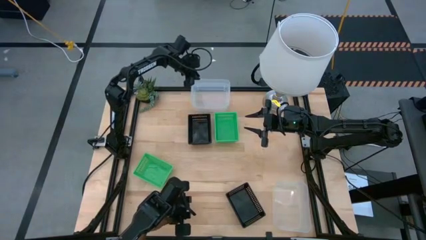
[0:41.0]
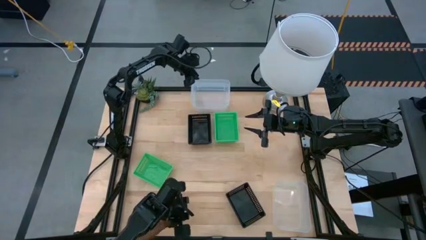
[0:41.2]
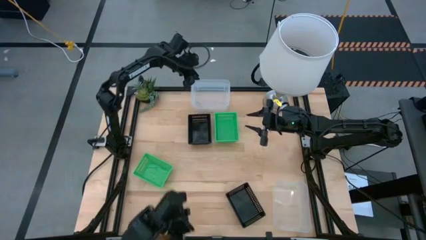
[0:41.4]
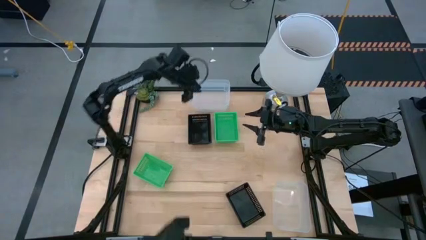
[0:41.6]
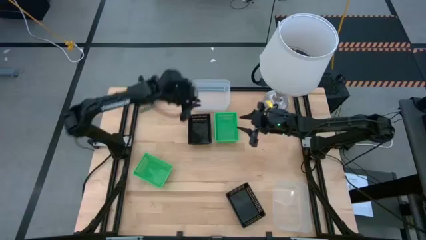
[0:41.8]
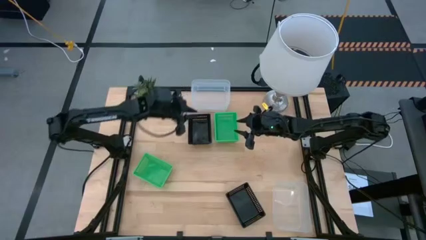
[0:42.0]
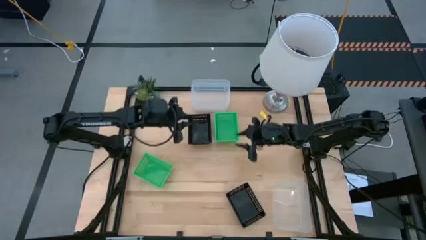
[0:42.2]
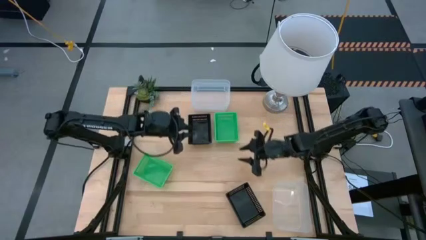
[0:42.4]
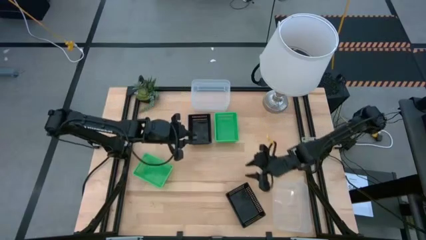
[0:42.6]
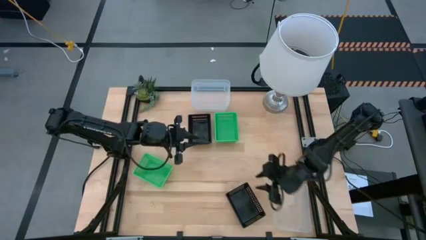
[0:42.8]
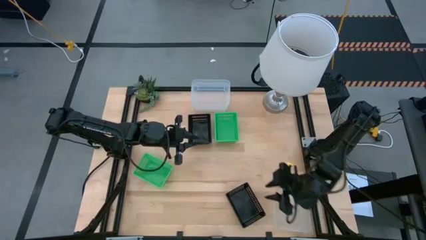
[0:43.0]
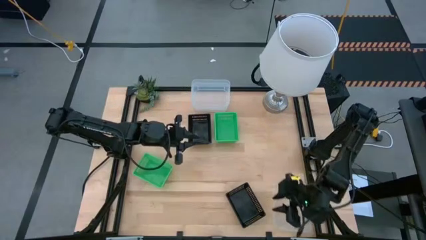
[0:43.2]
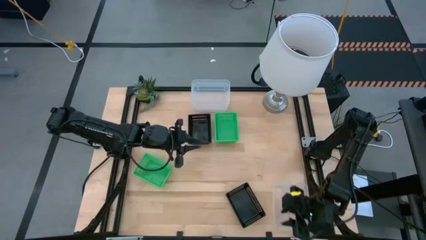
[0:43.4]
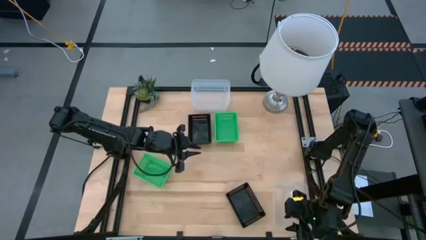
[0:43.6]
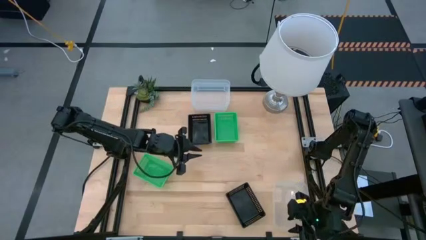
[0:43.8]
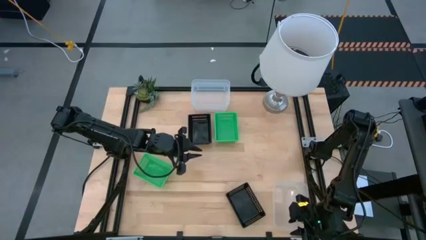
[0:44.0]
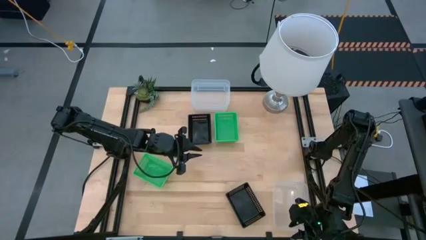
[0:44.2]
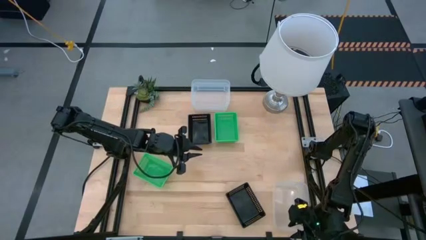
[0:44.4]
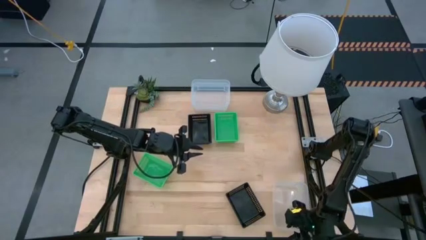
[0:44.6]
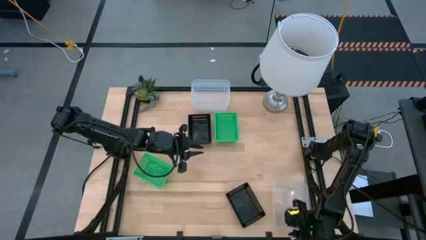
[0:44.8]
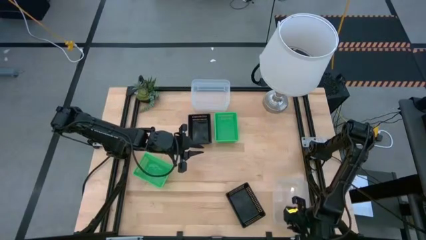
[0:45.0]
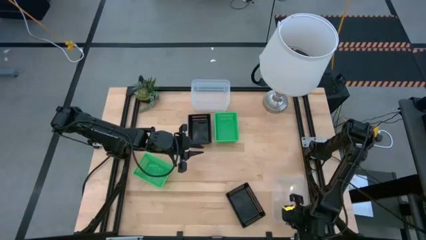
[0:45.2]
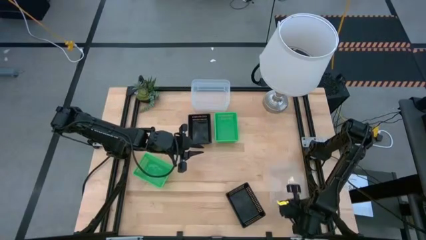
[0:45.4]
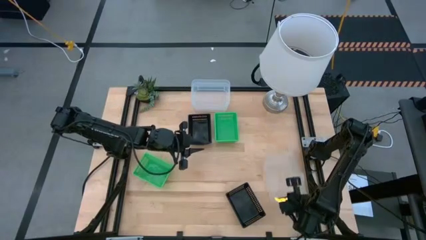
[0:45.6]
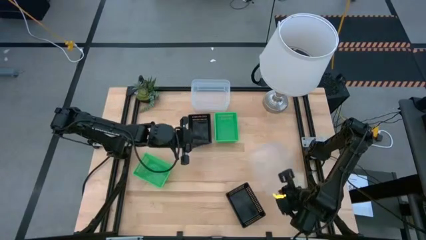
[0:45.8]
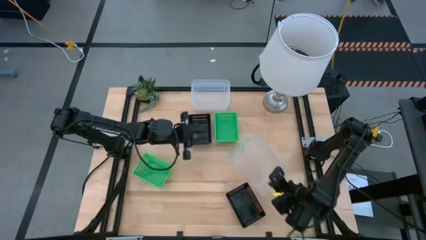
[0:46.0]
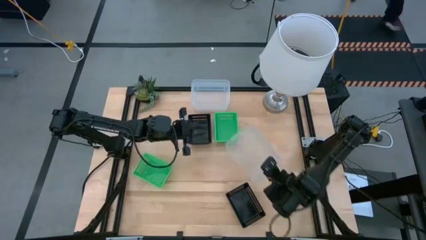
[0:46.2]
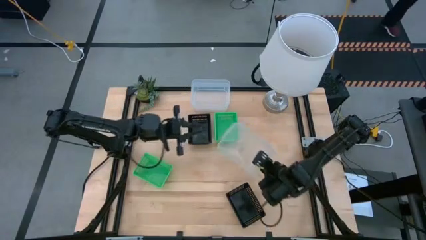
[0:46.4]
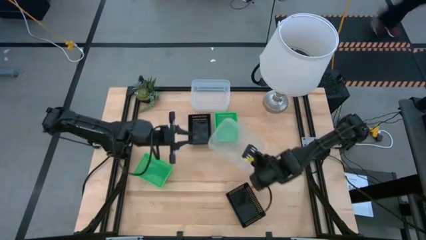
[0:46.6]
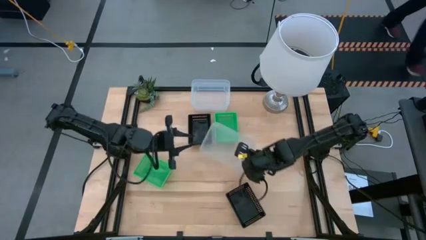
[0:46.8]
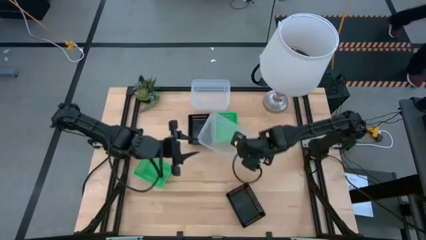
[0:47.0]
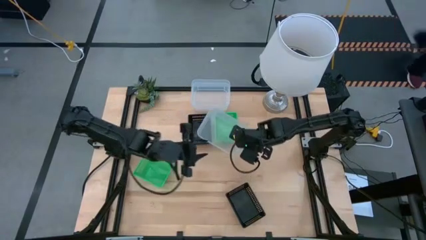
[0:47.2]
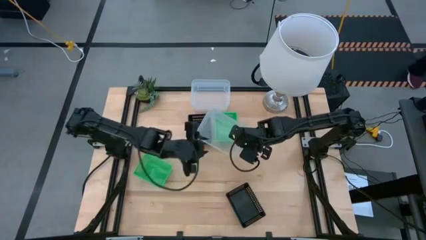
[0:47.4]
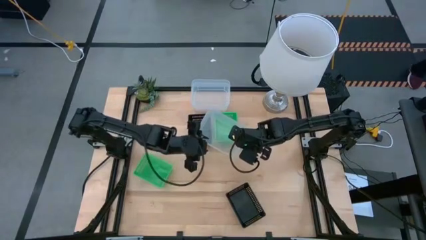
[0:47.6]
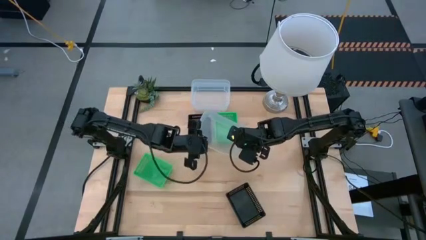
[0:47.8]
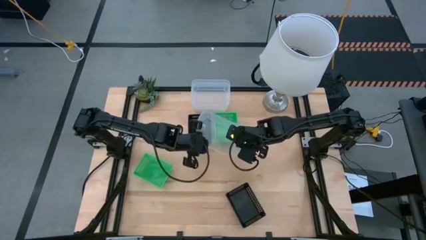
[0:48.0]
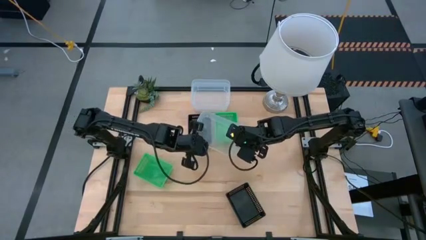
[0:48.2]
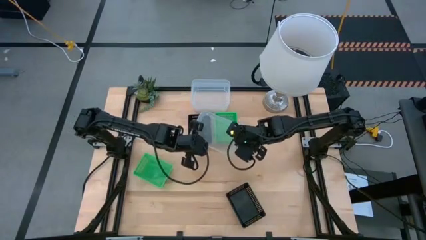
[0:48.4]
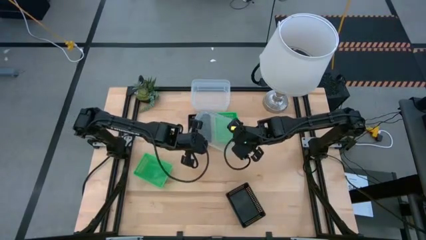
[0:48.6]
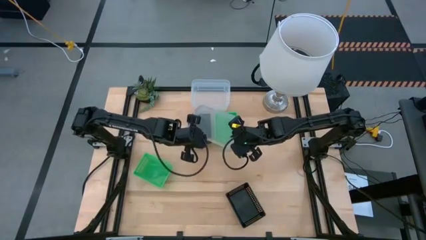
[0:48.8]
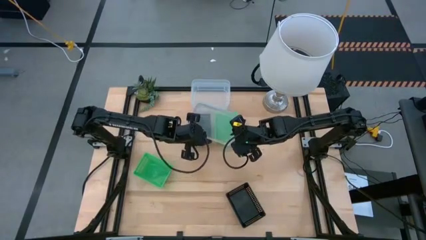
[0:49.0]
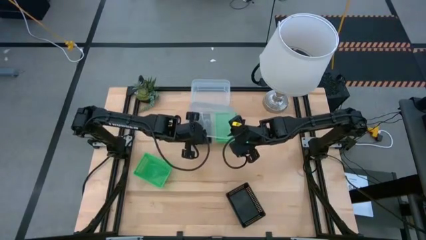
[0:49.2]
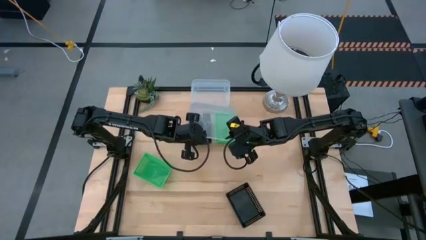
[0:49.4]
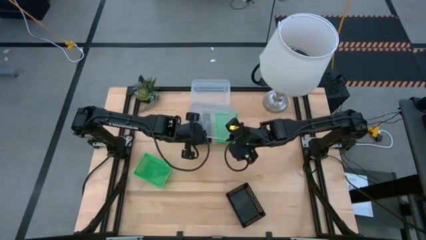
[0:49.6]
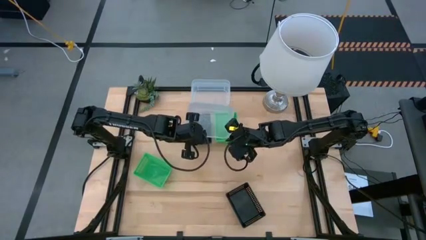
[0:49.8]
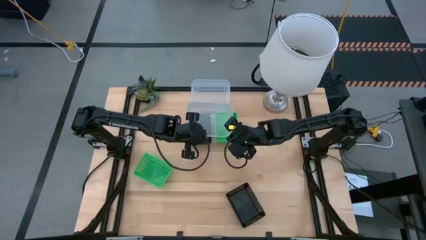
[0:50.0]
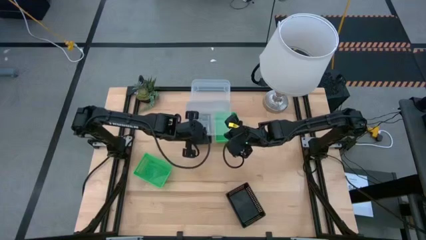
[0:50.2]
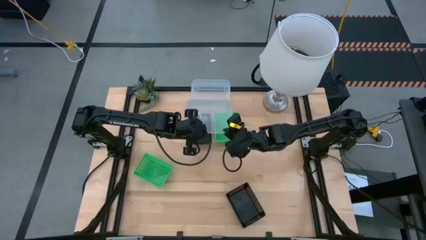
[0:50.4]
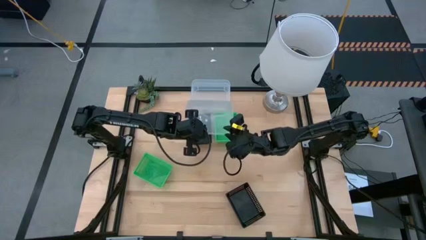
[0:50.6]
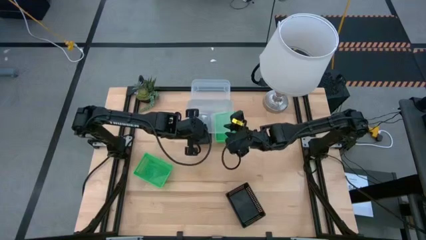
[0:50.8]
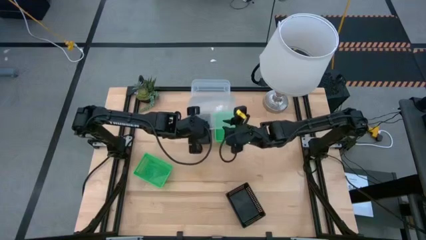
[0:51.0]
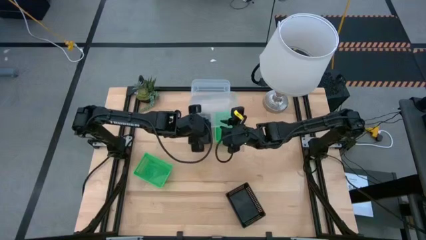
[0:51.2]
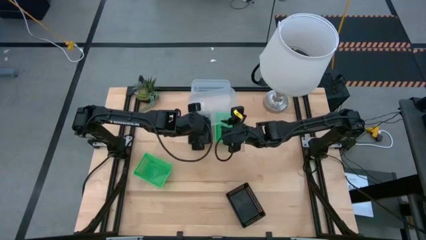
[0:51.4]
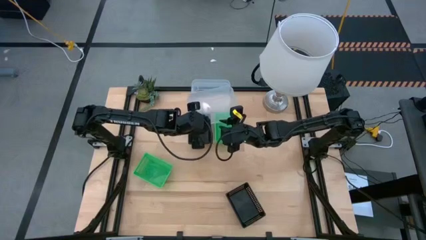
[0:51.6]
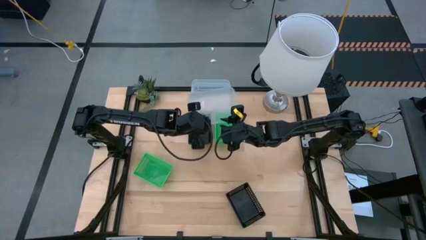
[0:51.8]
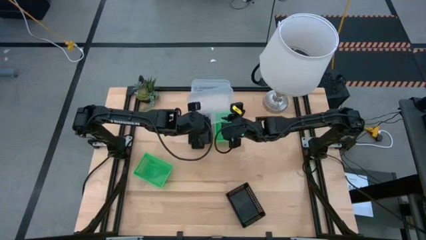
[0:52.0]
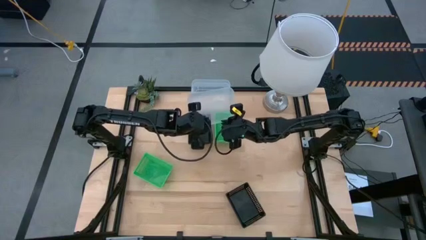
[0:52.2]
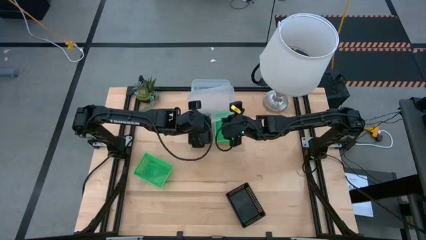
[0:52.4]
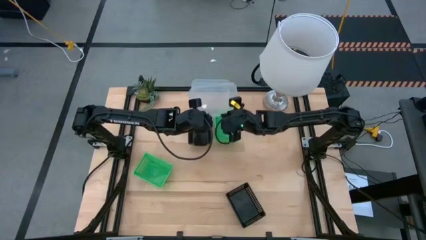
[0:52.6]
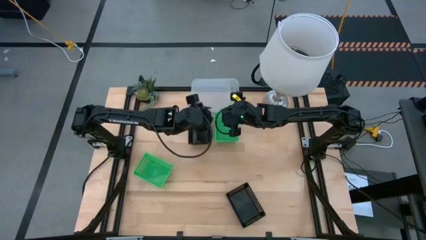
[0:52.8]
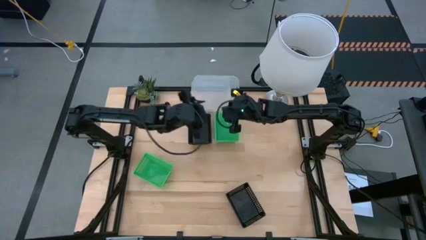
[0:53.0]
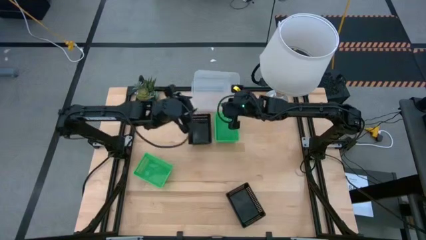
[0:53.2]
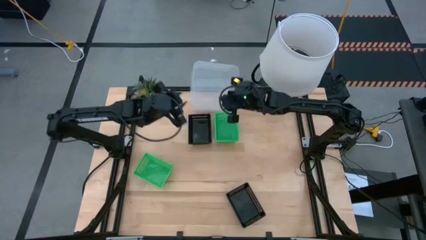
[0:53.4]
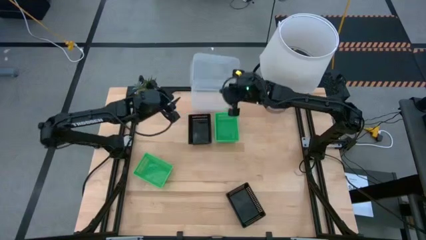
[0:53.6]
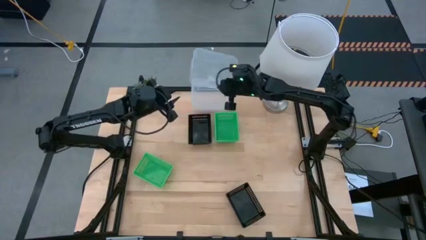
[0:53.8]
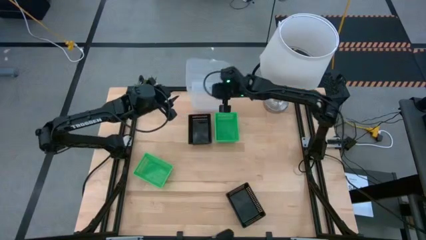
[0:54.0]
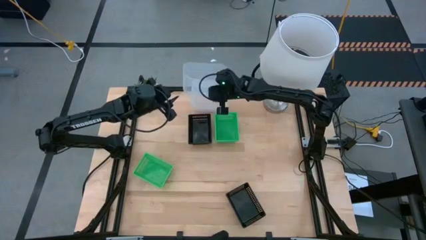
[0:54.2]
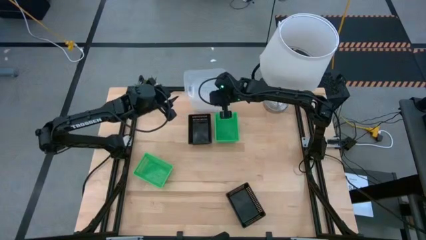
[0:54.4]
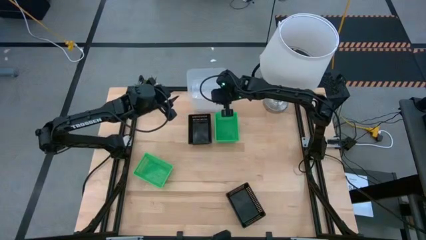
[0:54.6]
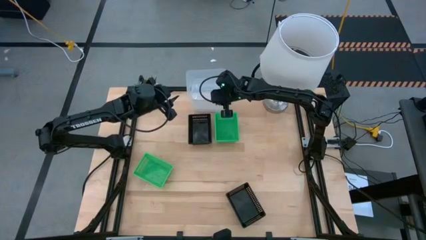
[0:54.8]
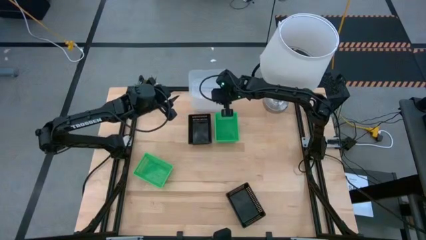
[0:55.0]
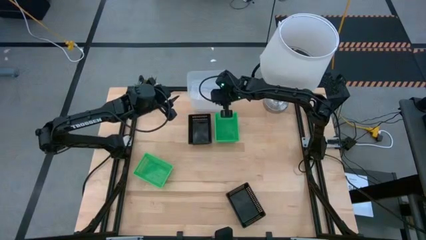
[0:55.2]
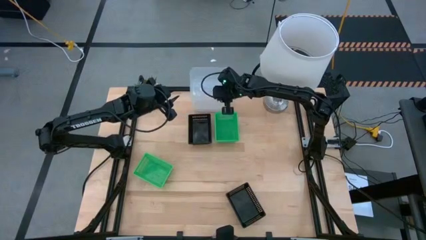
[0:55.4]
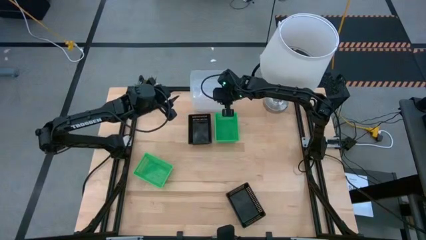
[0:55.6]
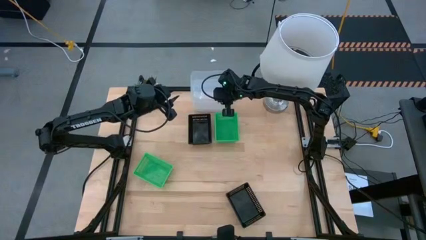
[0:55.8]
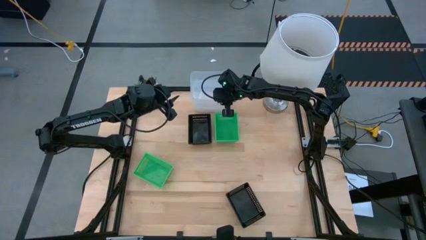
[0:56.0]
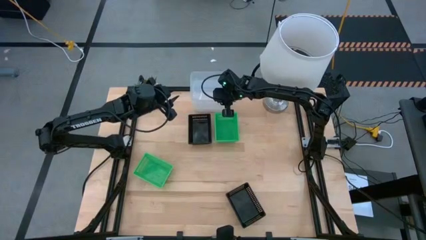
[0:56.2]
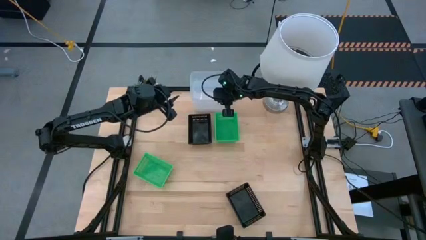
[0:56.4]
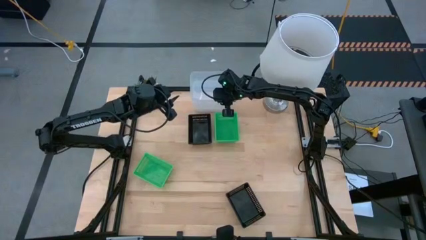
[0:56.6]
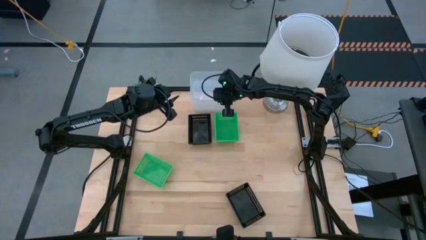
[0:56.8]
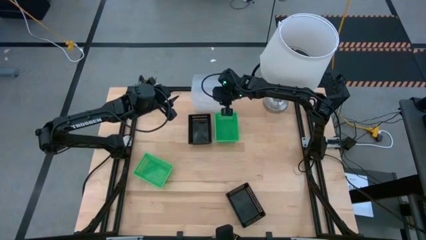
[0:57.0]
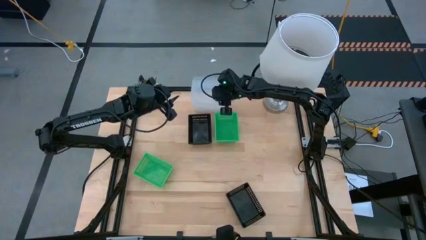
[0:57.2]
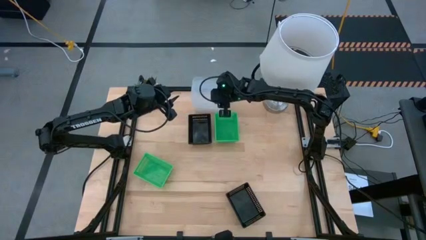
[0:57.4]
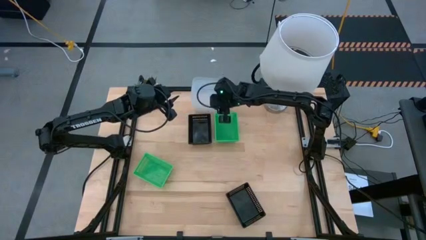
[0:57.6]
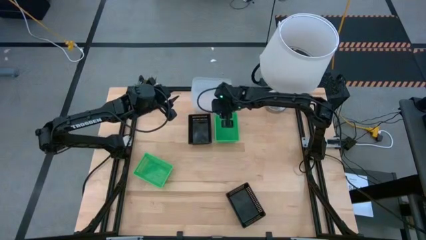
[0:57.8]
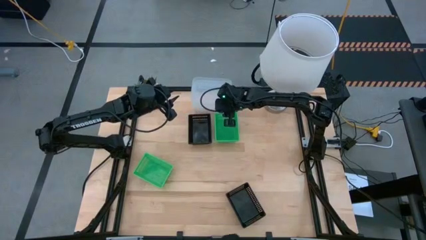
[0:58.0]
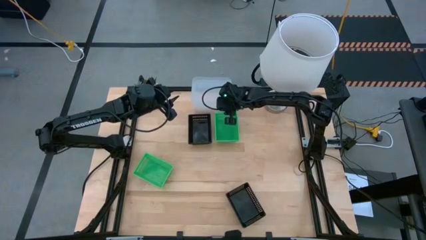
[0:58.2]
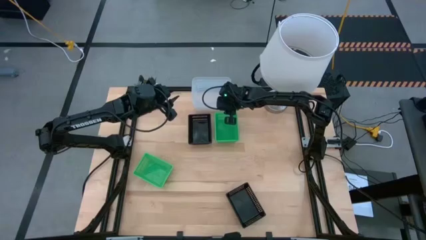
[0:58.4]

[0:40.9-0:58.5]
Stack the bottom transparent bin on the top stacked transparent bin
